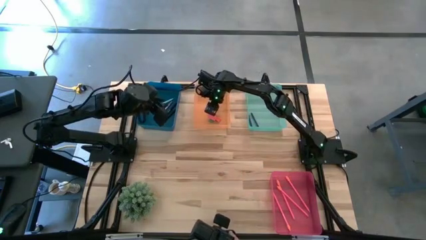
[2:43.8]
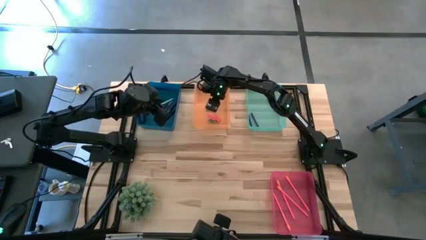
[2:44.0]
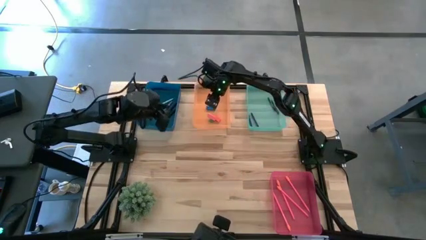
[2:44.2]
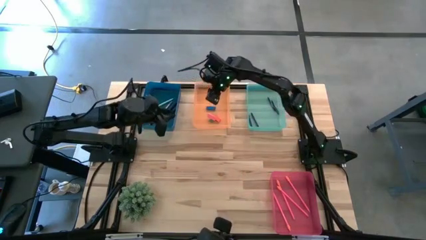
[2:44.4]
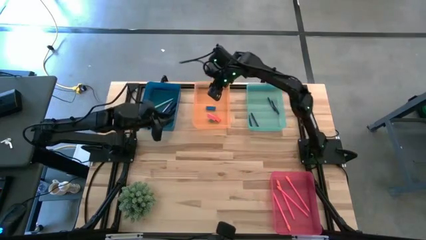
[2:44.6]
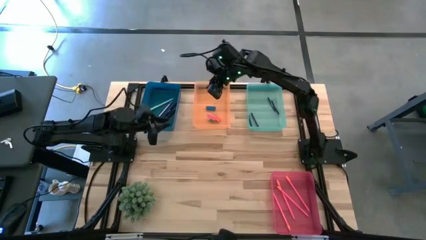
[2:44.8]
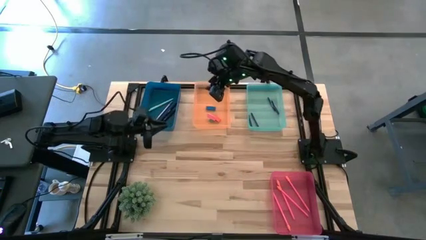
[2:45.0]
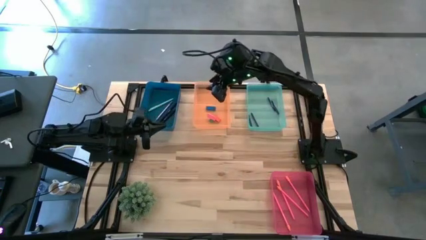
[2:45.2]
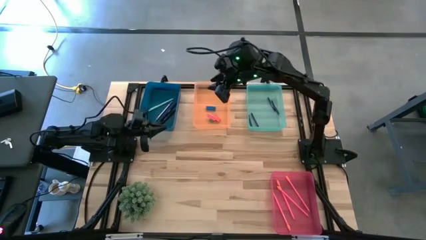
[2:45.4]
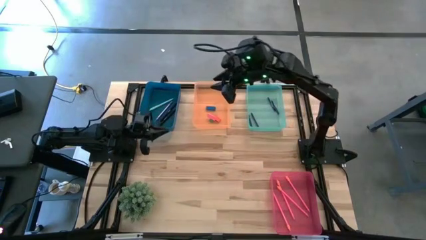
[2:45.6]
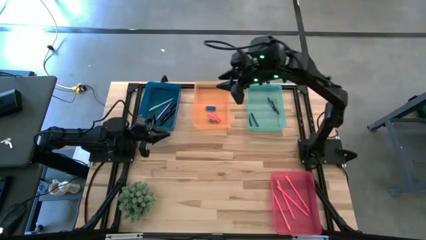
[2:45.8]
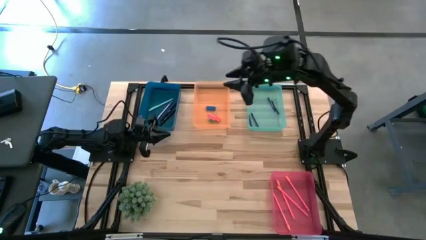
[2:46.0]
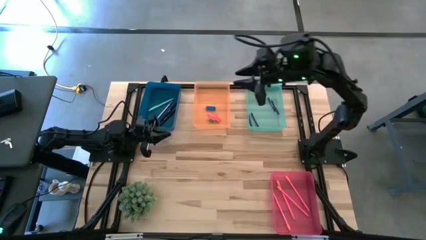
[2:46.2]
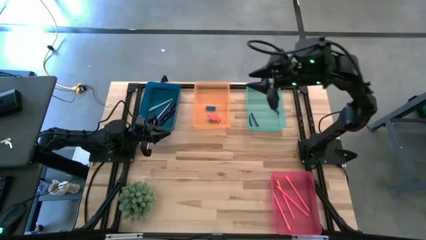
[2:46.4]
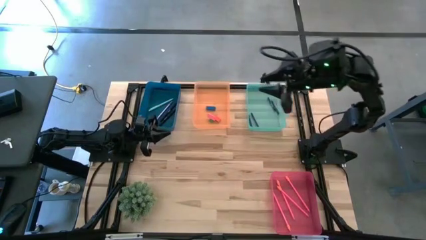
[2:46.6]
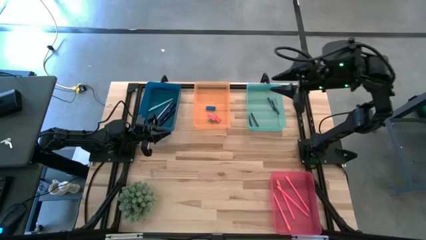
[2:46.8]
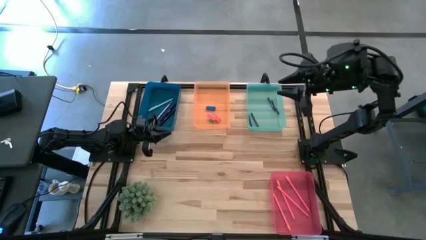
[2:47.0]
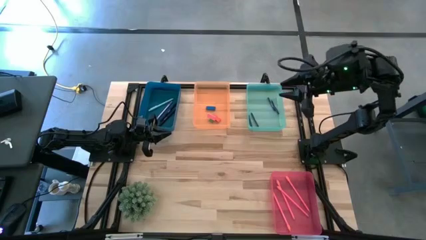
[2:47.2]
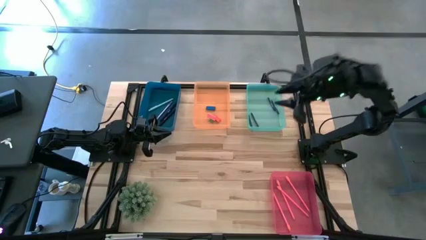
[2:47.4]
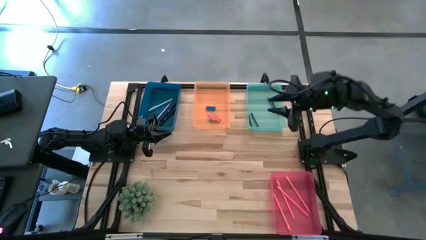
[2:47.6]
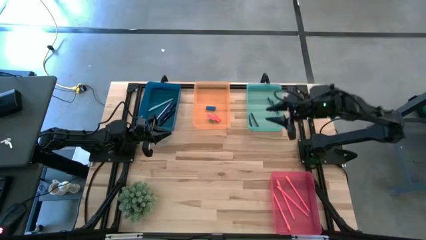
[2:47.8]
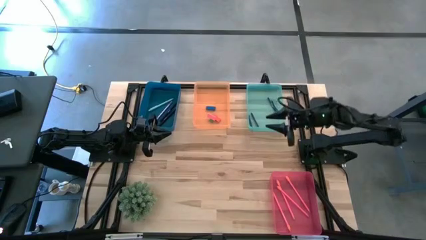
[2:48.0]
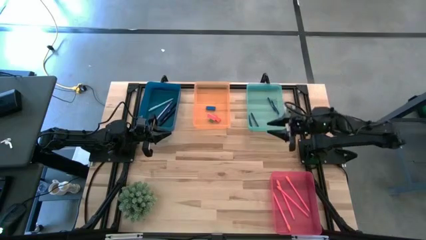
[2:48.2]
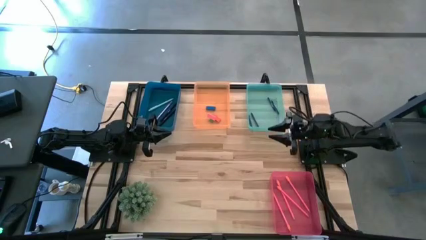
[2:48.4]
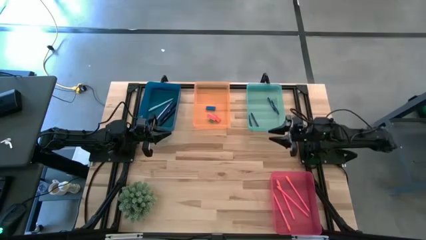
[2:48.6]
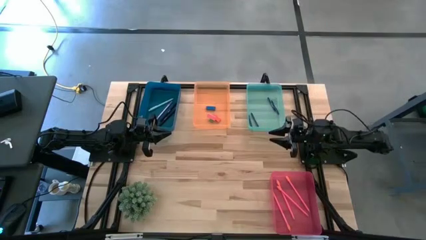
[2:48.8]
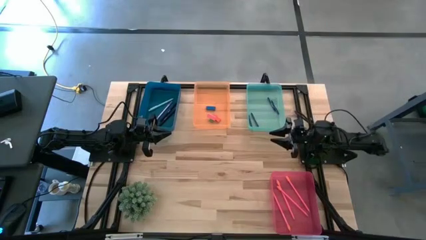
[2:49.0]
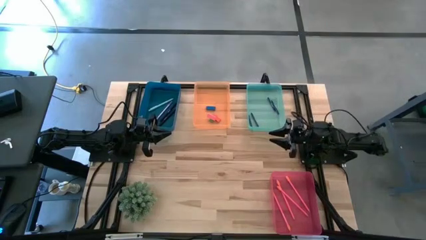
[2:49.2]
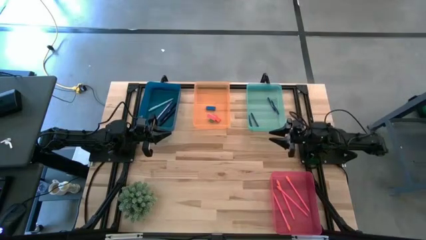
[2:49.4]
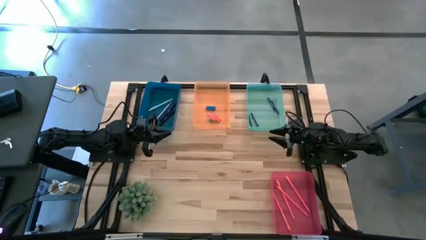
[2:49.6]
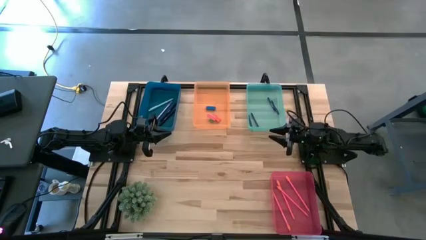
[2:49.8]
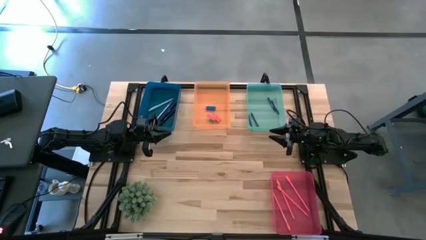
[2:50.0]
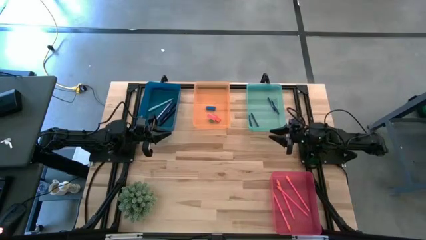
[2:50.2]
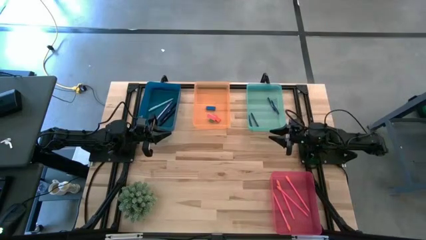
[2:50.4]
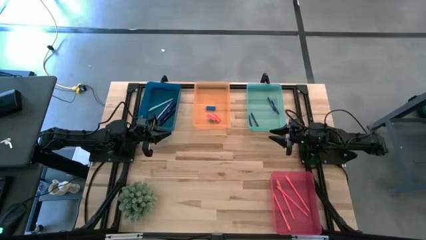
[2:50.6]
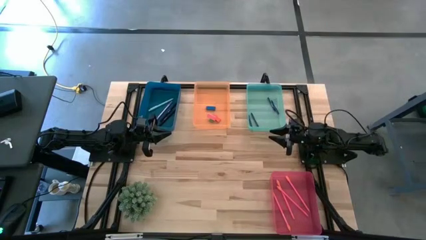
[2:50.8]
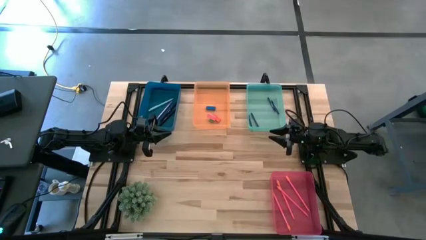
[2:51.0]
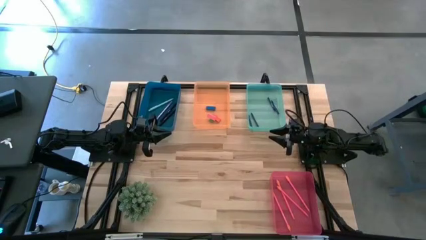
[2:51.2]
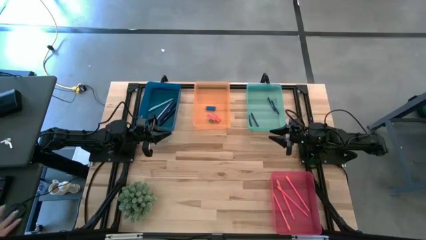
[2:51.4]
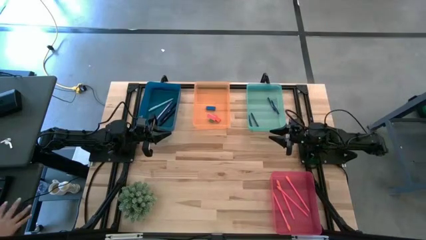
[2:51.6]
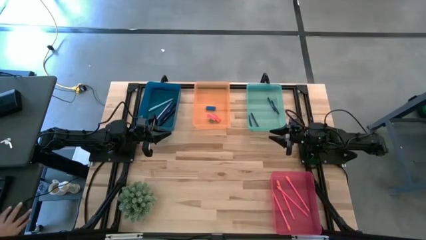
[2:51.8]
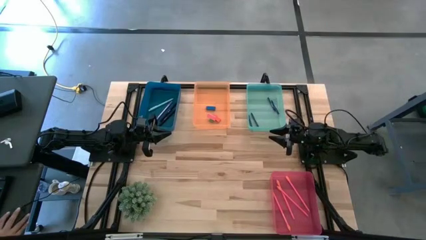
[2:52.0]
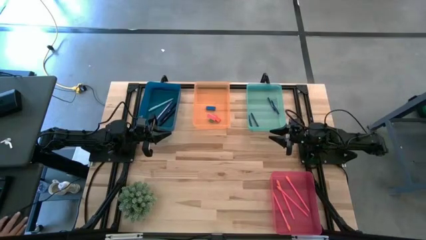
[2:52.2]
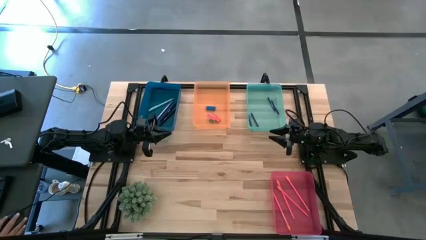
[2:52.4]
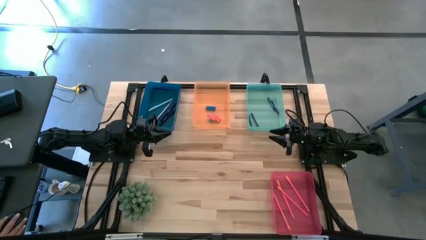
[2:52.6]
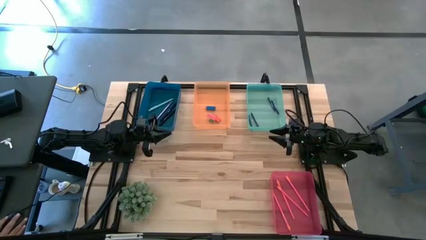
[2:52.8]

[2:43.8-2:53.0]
Task: Sort crayons/erasers/pens/pencils in bins
Return to Home Position
